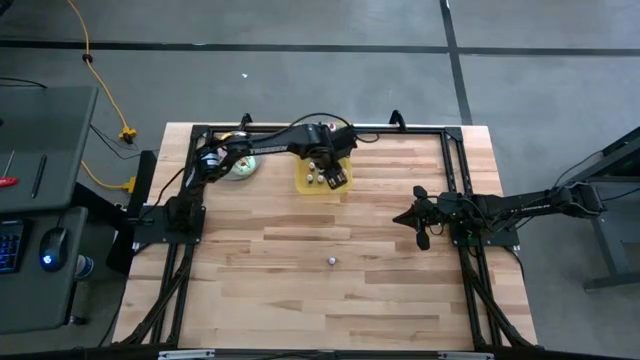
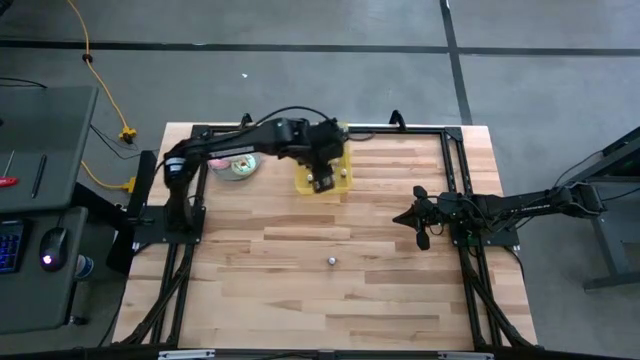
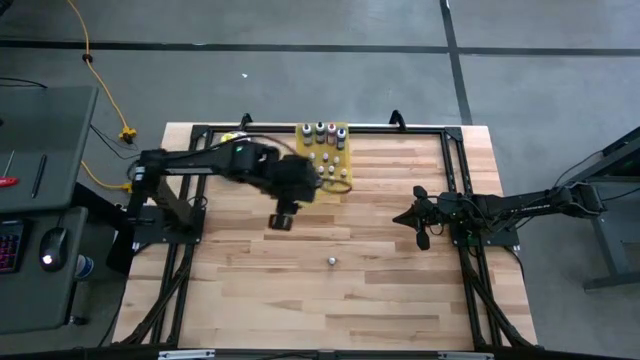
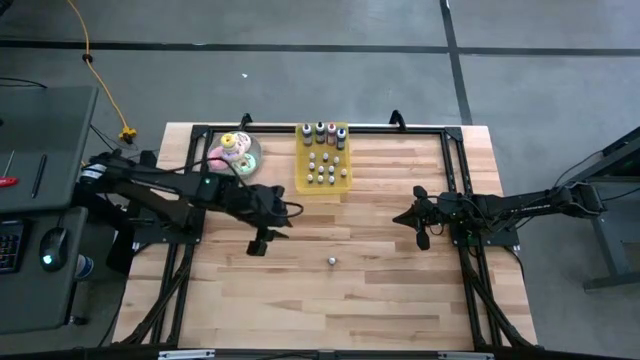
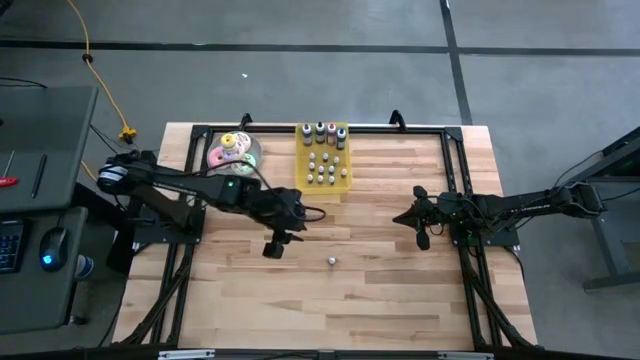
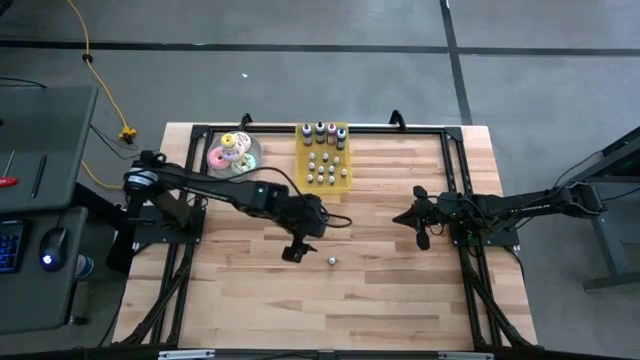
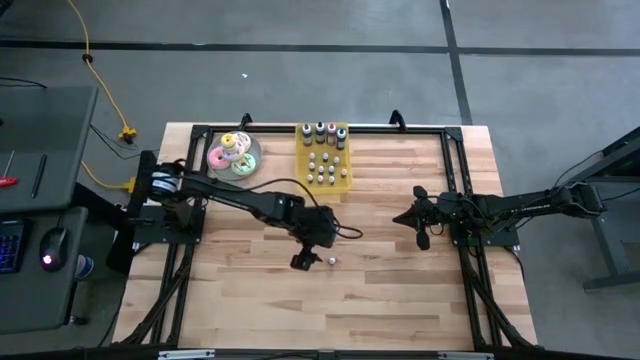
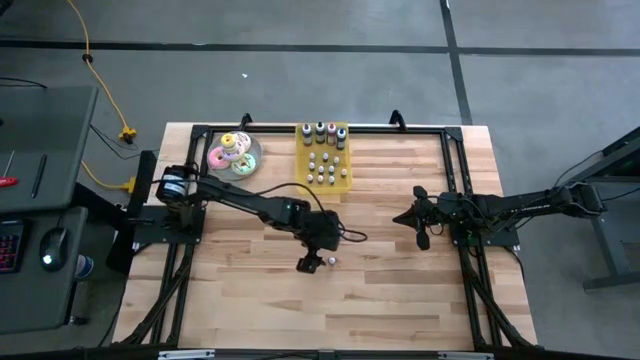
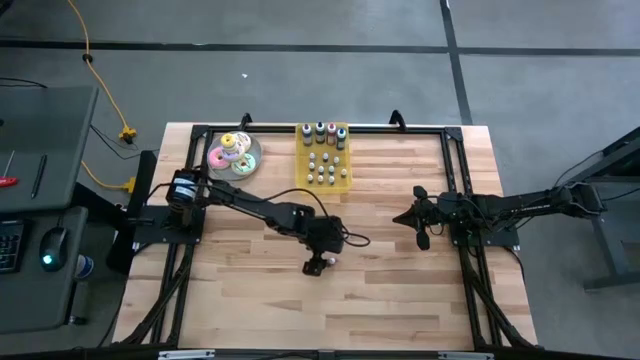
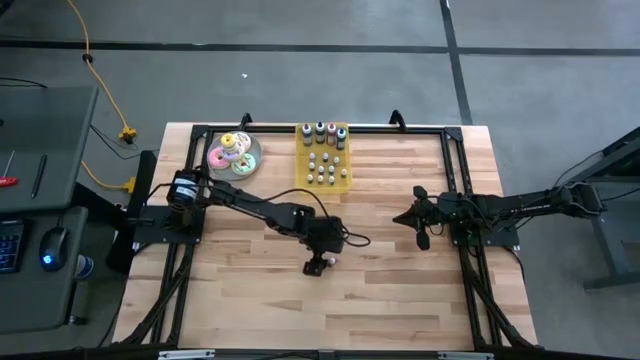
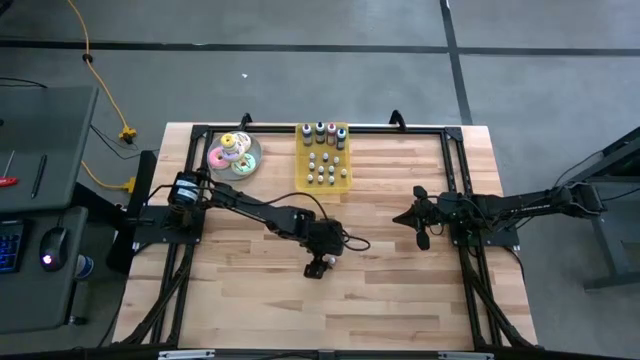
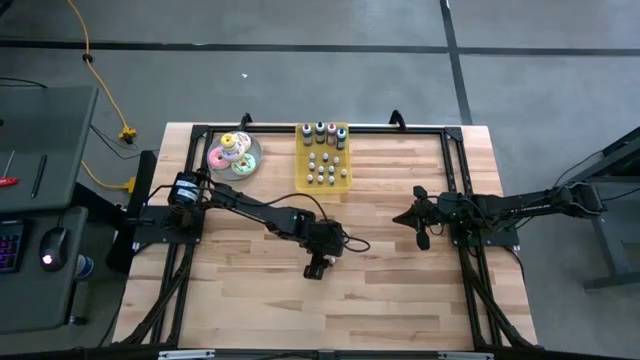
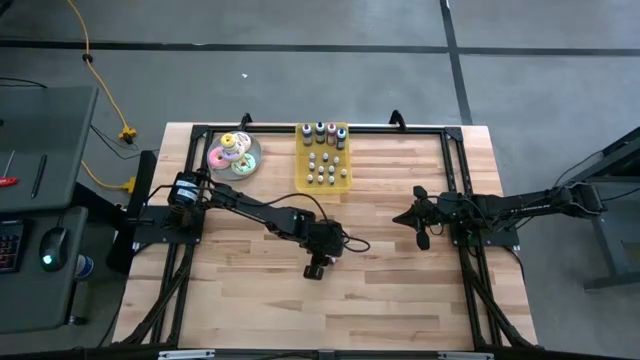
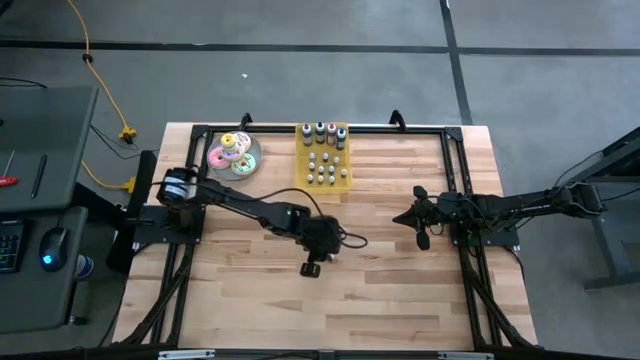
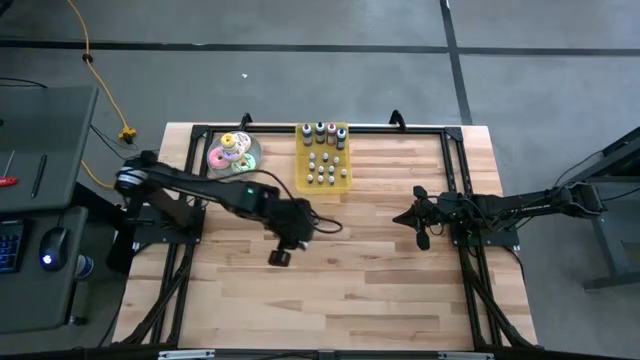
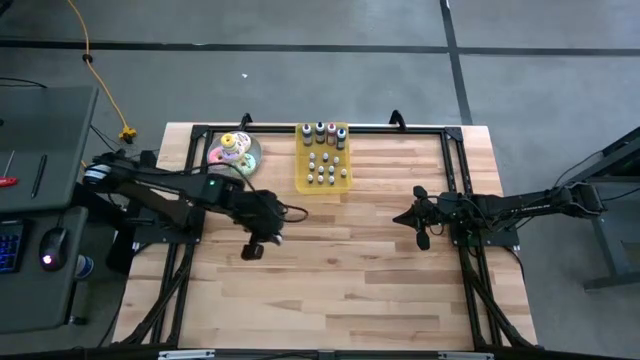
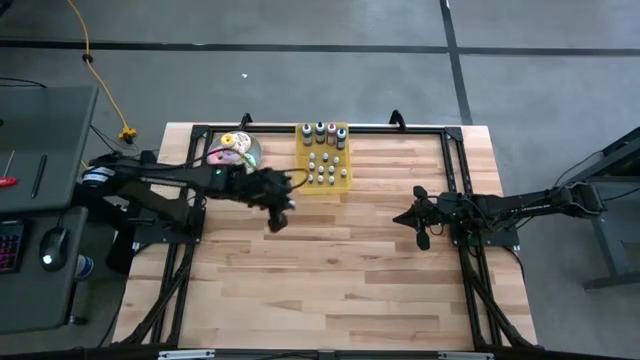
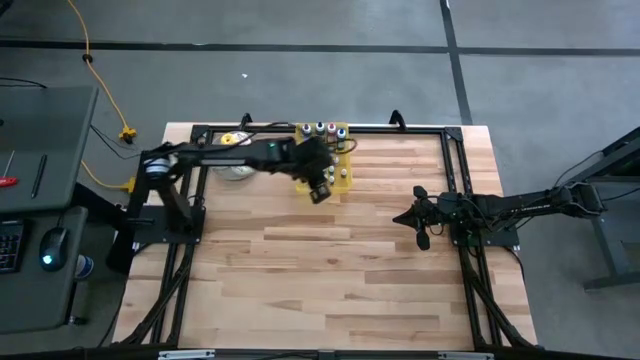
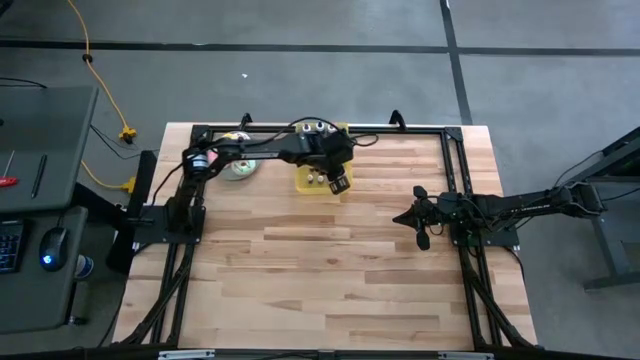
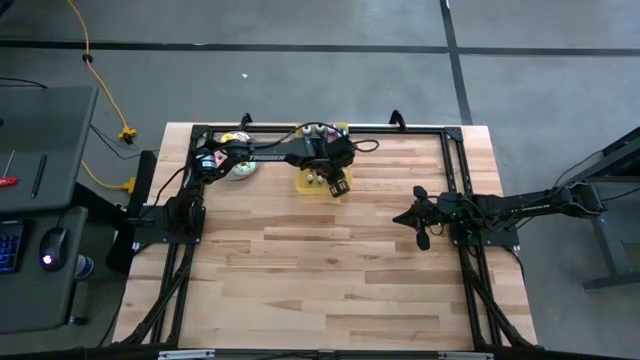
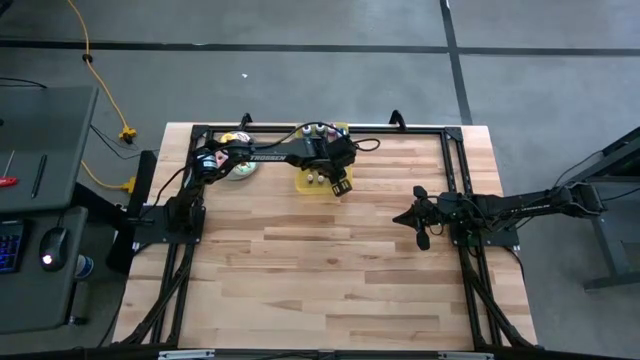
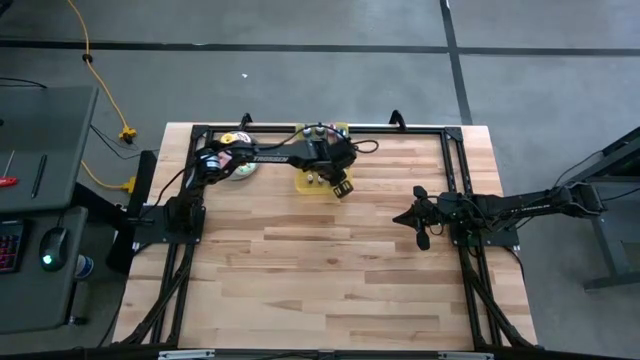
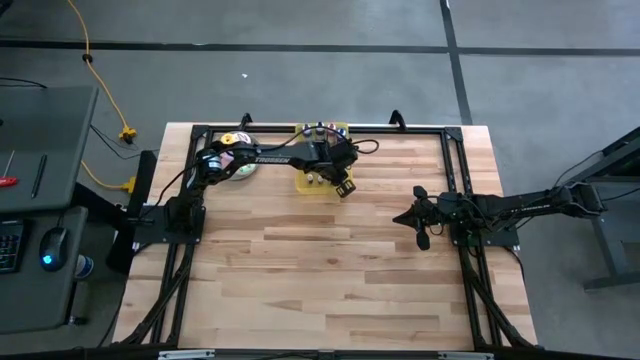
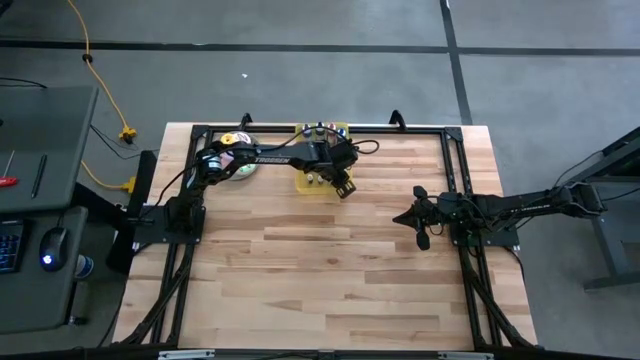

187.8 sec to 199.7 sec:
Task: Pick & Place food coloring
Put the small red food coloring bottle into the yellow bin

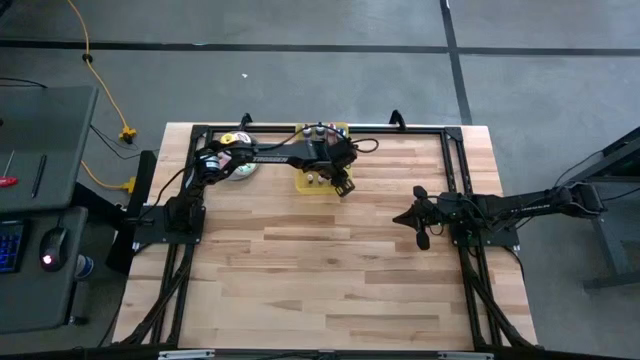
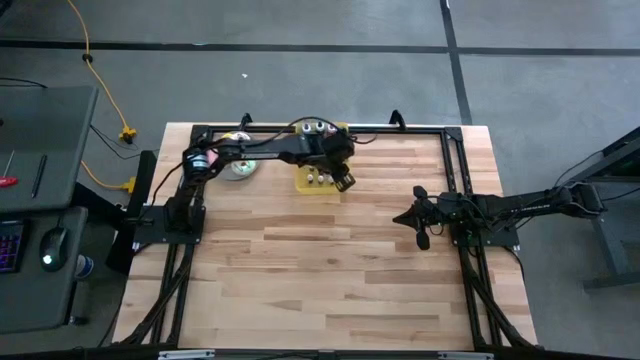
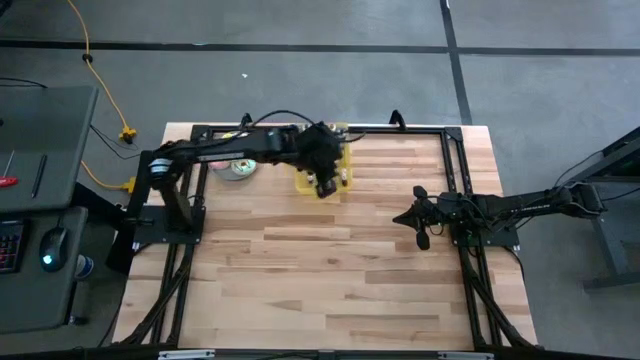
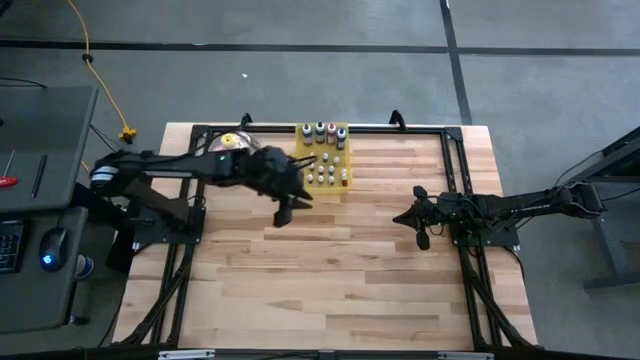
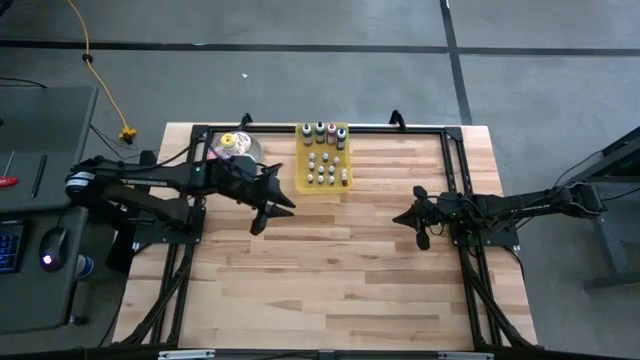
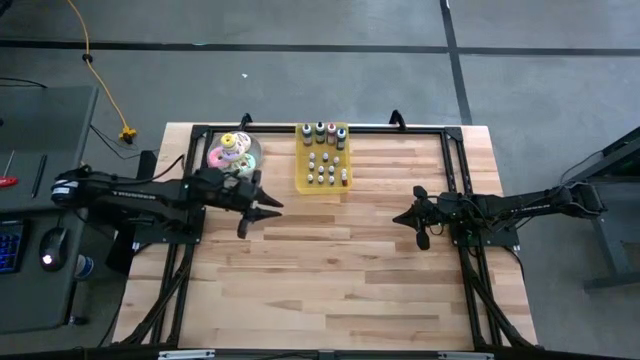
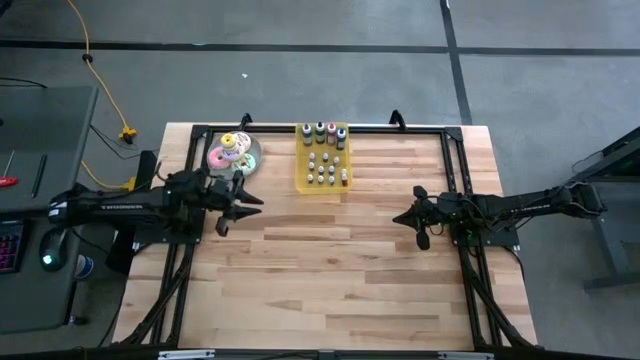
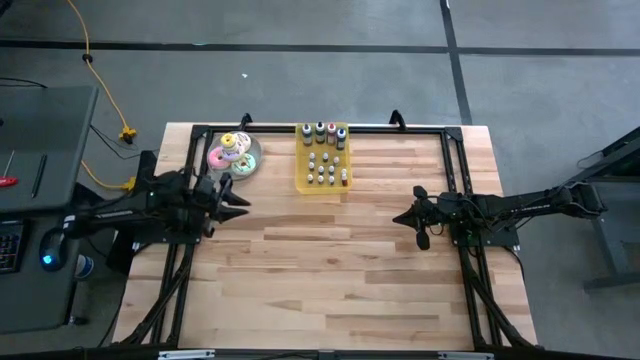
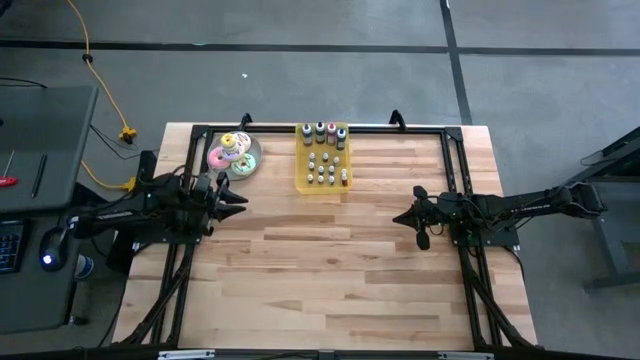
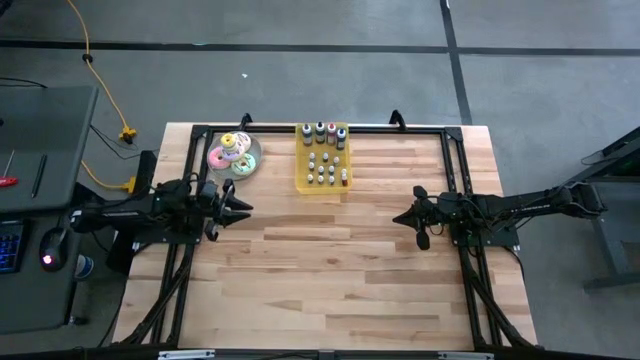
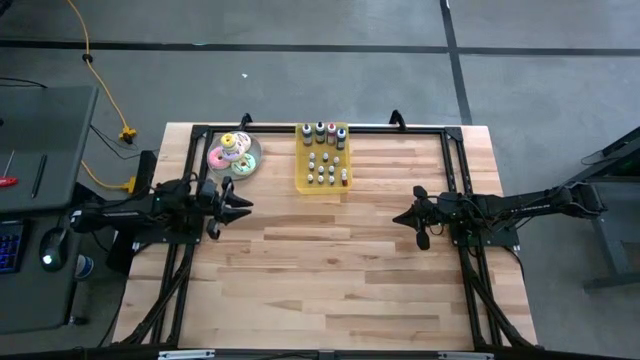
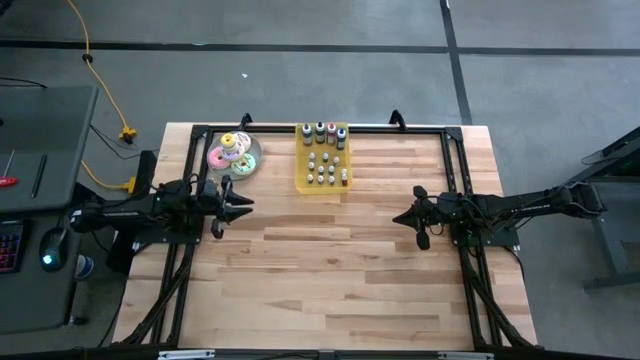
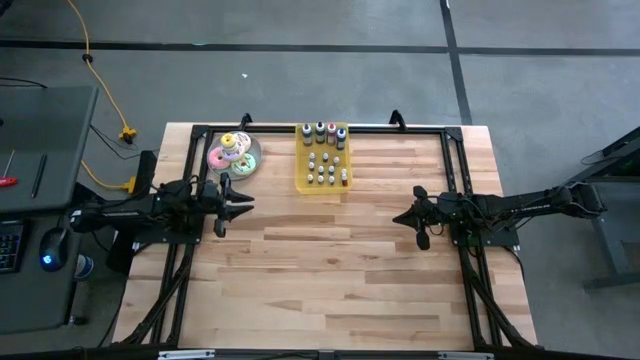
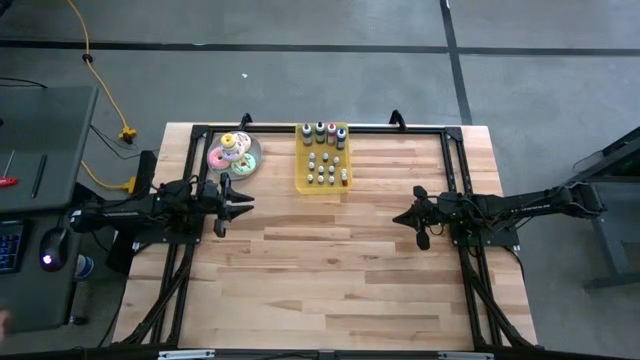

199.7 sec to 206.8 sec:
Return to Home Position

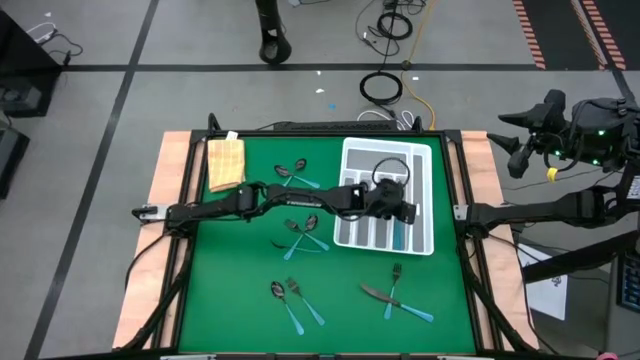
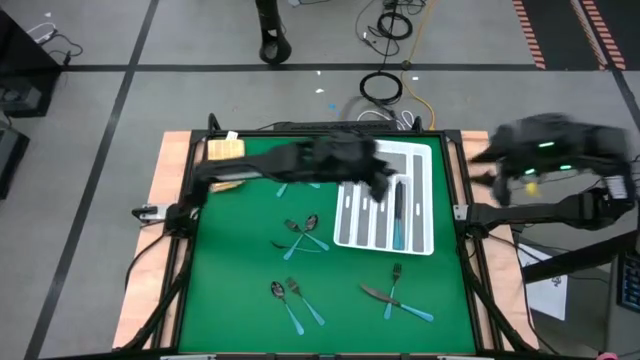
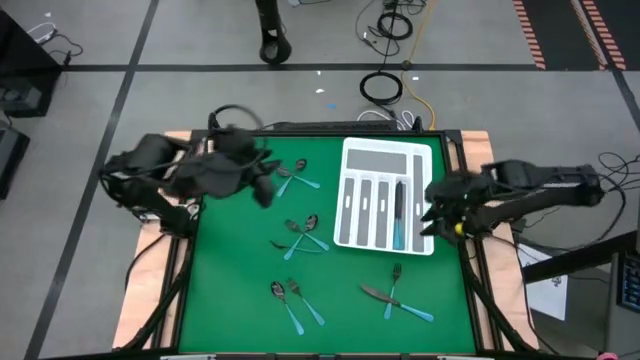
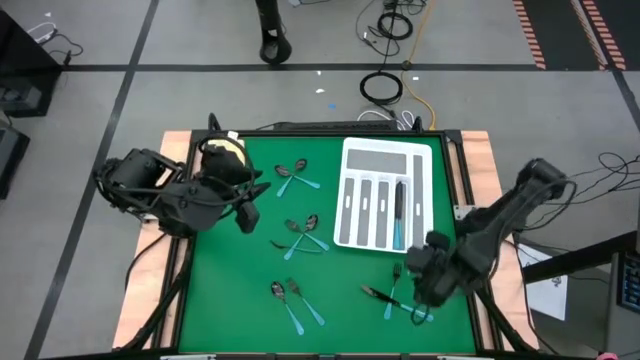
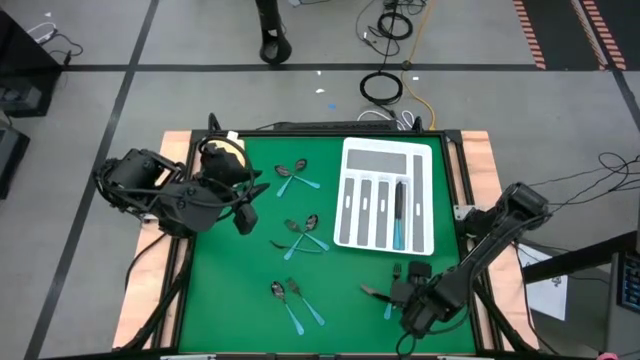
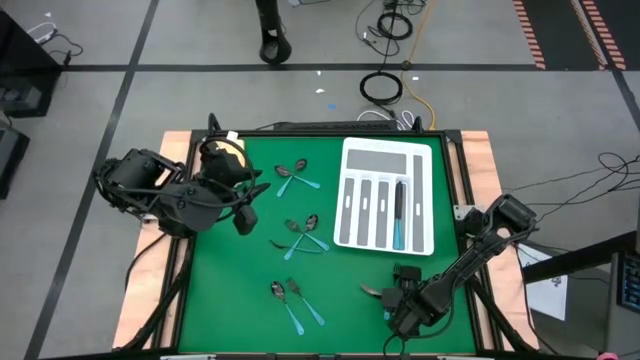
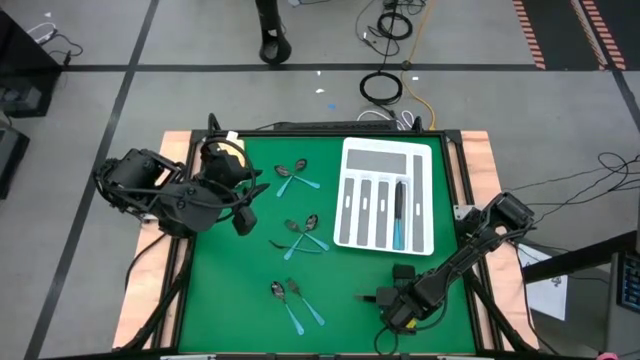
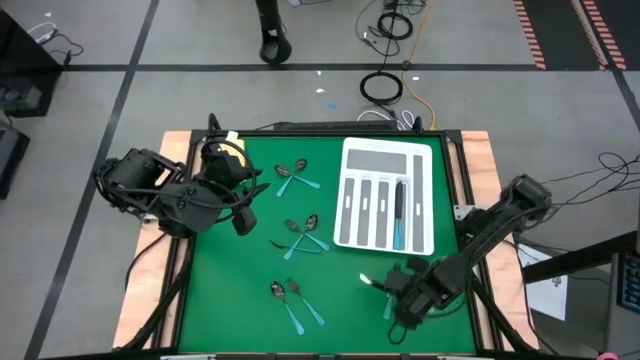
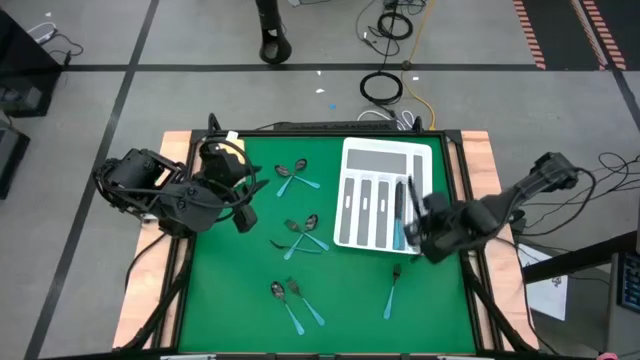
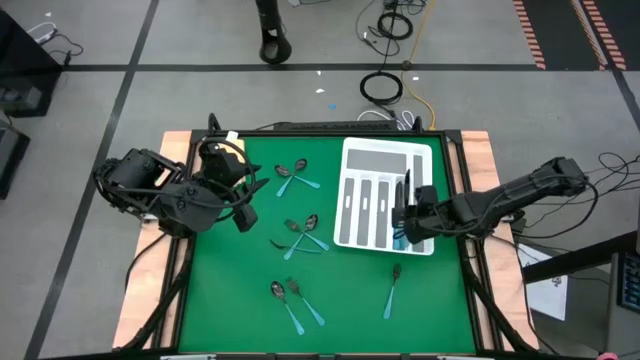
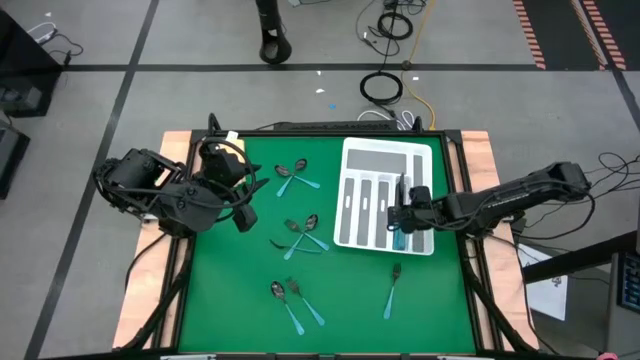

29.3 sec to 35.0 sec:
Task: Sort silverware
Put the blue table knife into the silverware tray with the other blue table knives
